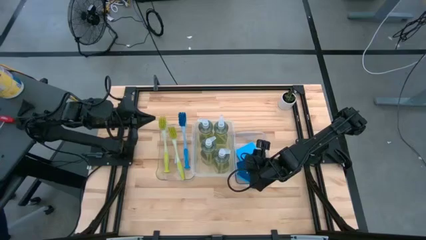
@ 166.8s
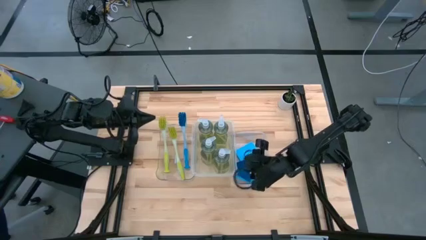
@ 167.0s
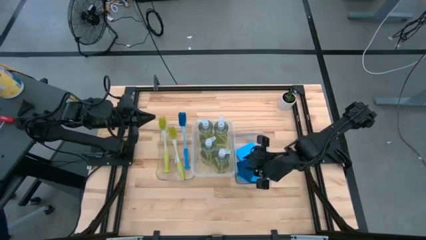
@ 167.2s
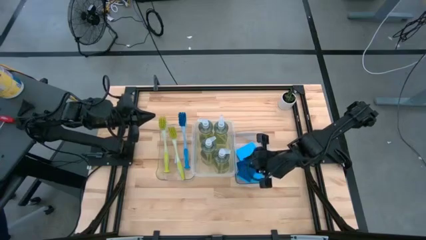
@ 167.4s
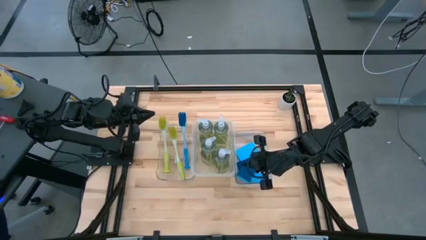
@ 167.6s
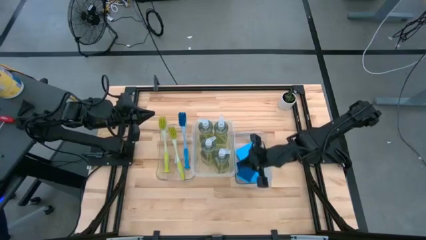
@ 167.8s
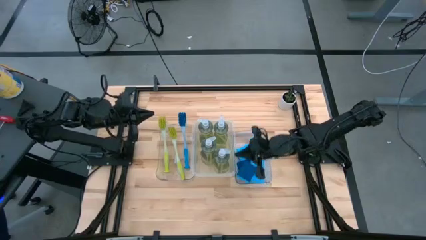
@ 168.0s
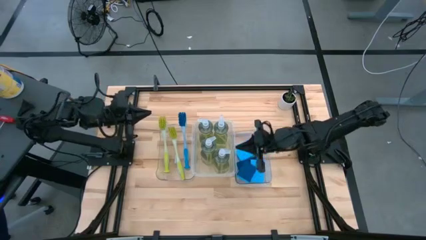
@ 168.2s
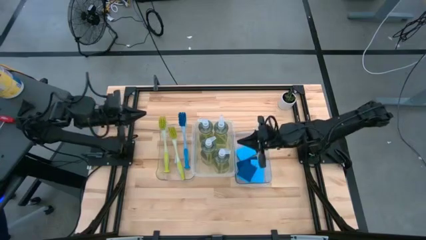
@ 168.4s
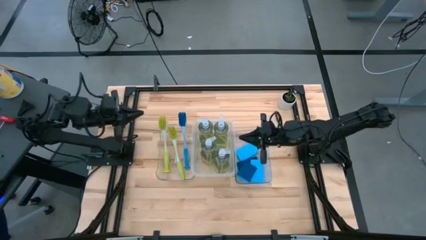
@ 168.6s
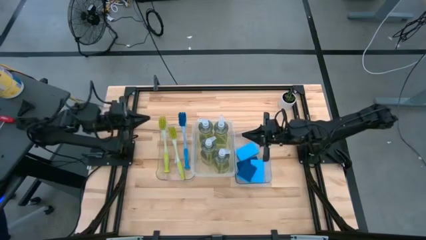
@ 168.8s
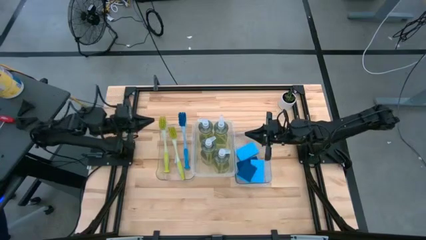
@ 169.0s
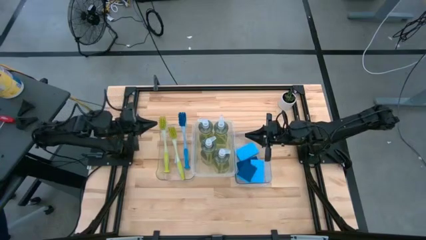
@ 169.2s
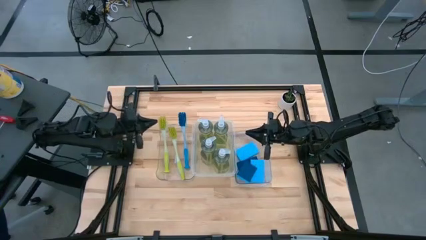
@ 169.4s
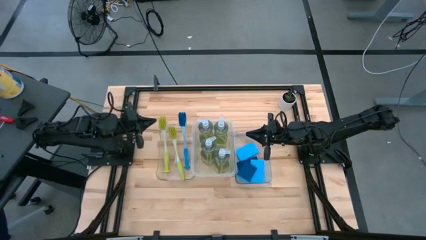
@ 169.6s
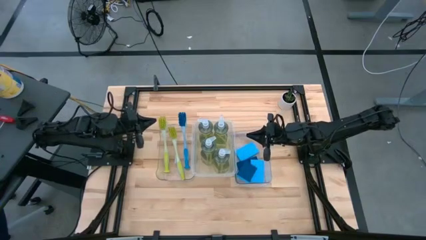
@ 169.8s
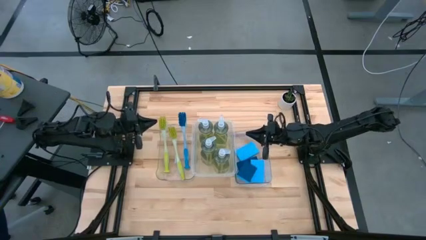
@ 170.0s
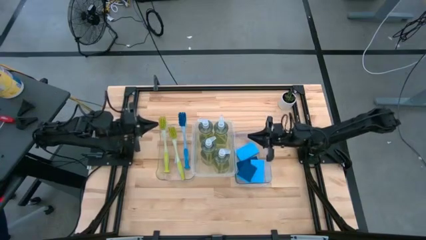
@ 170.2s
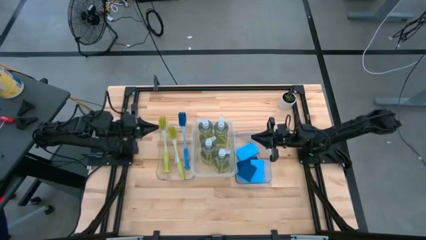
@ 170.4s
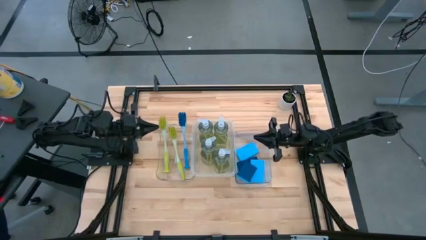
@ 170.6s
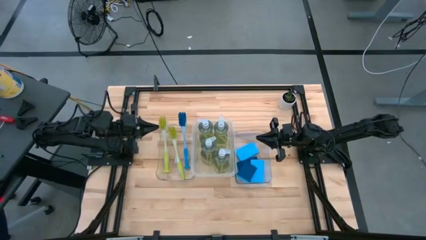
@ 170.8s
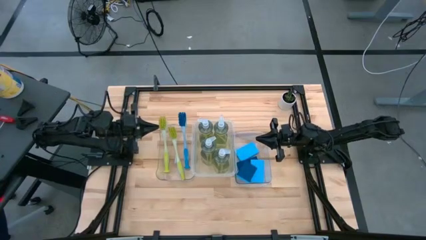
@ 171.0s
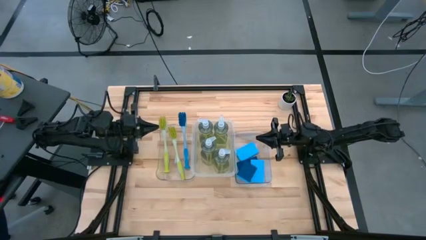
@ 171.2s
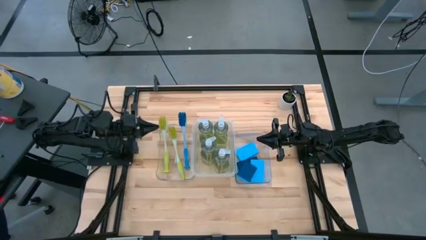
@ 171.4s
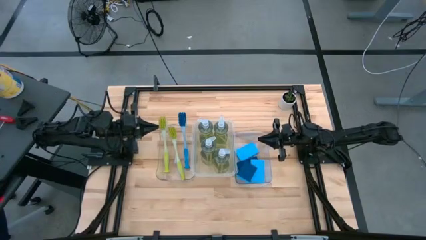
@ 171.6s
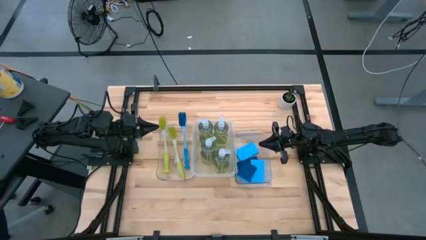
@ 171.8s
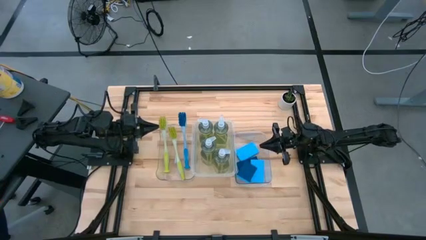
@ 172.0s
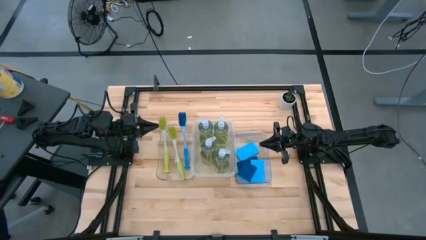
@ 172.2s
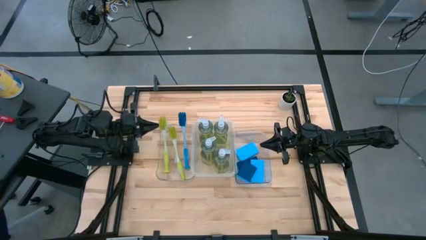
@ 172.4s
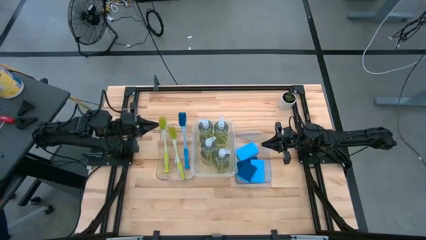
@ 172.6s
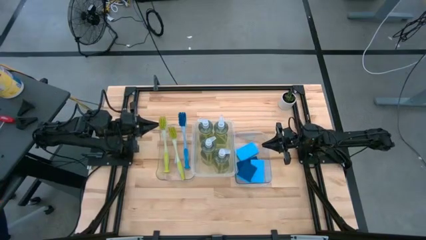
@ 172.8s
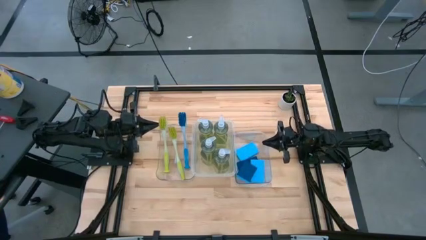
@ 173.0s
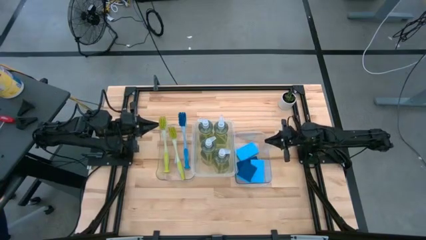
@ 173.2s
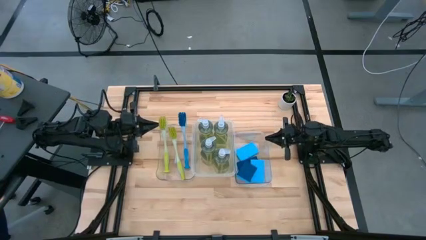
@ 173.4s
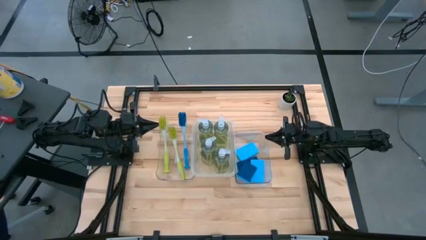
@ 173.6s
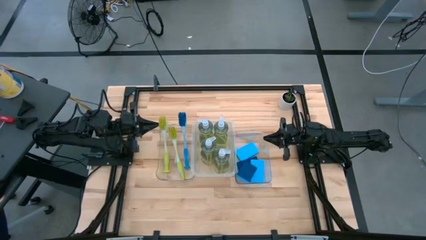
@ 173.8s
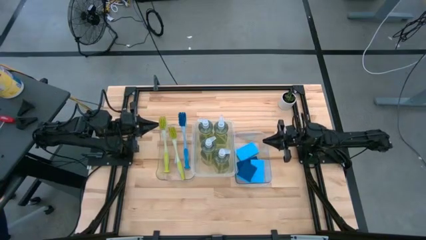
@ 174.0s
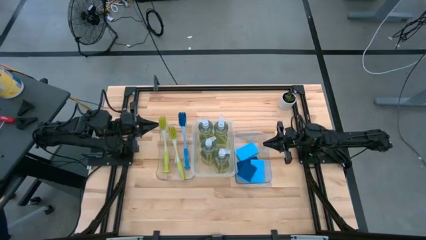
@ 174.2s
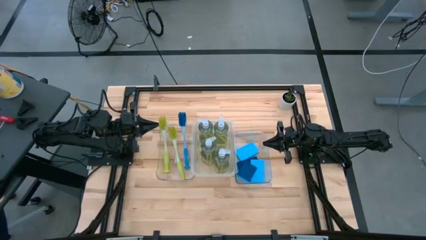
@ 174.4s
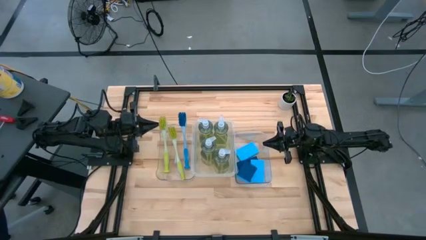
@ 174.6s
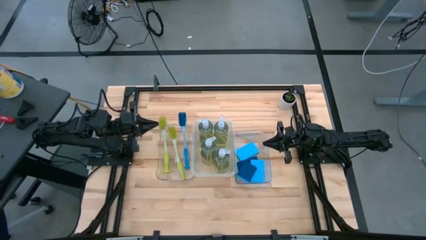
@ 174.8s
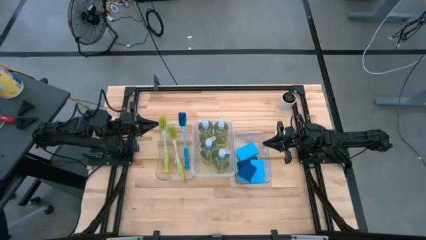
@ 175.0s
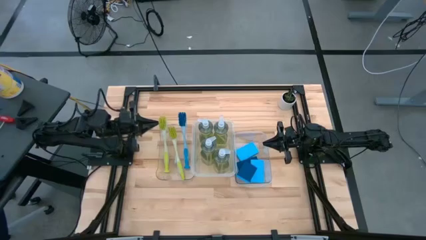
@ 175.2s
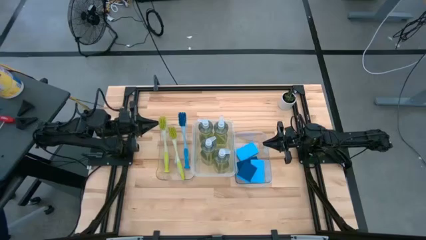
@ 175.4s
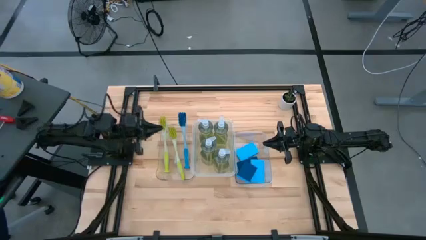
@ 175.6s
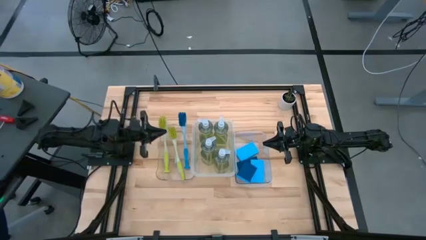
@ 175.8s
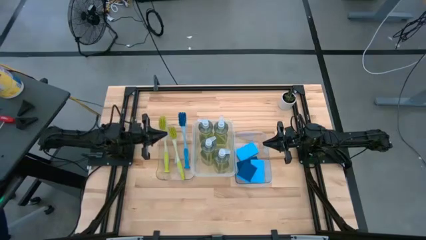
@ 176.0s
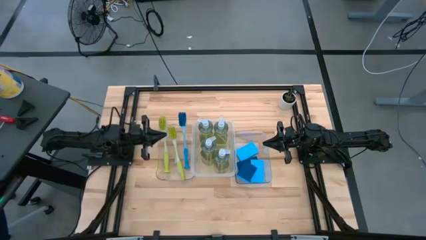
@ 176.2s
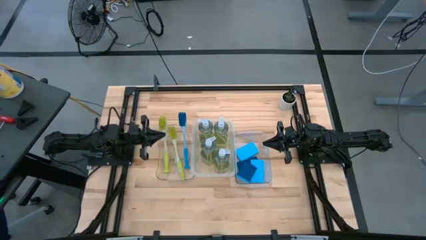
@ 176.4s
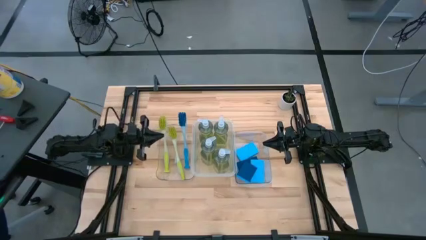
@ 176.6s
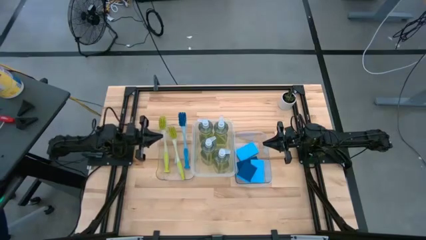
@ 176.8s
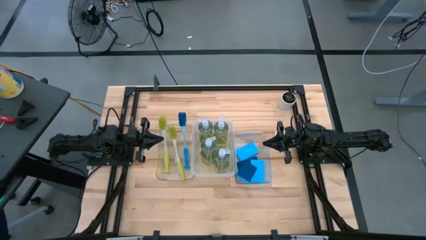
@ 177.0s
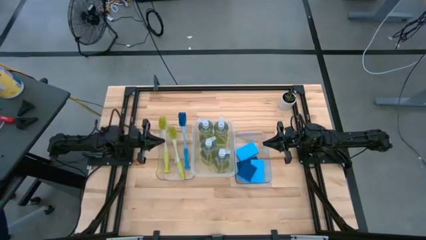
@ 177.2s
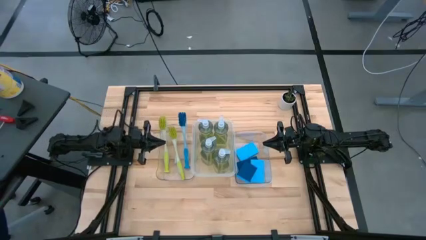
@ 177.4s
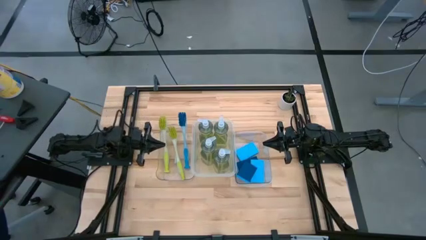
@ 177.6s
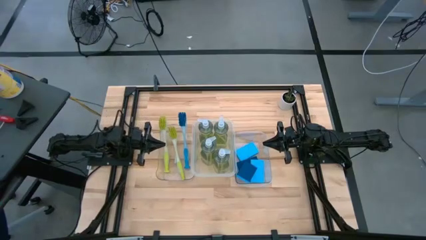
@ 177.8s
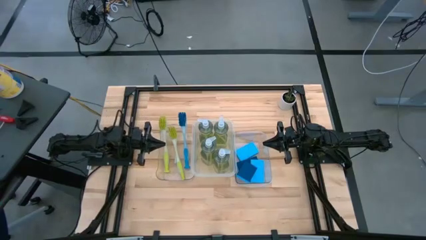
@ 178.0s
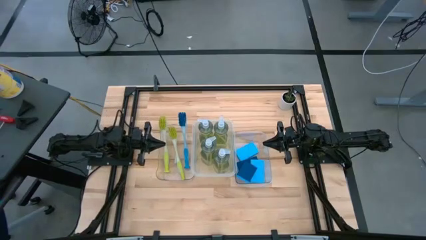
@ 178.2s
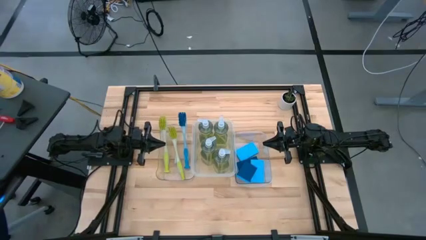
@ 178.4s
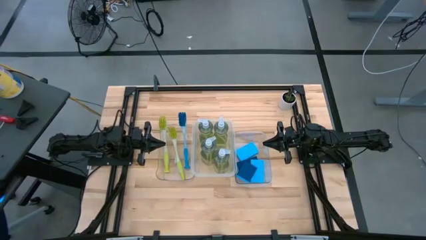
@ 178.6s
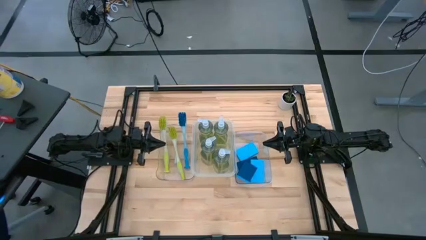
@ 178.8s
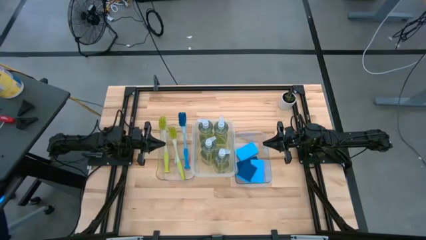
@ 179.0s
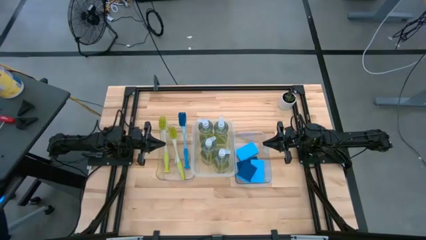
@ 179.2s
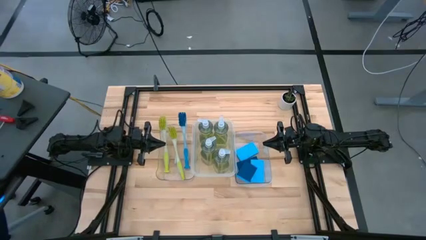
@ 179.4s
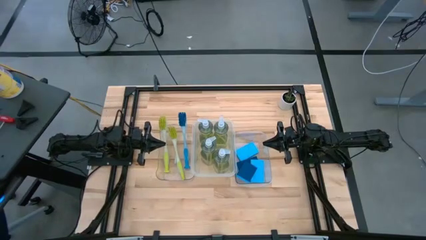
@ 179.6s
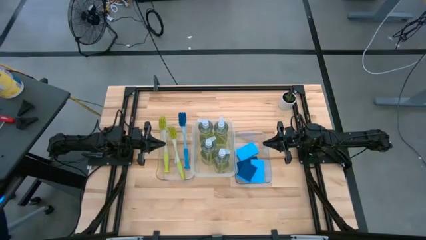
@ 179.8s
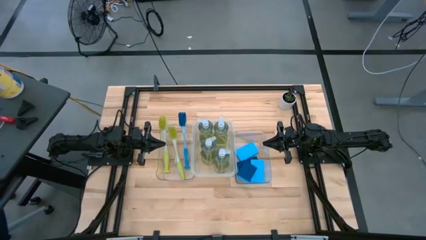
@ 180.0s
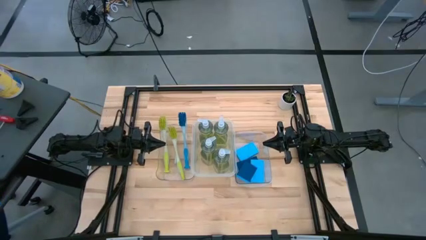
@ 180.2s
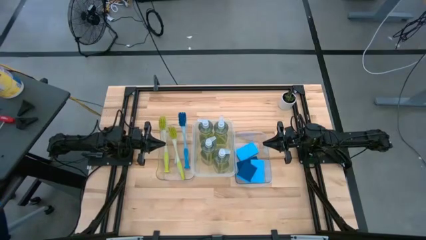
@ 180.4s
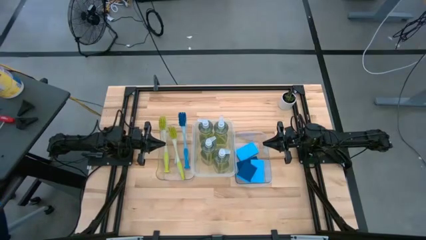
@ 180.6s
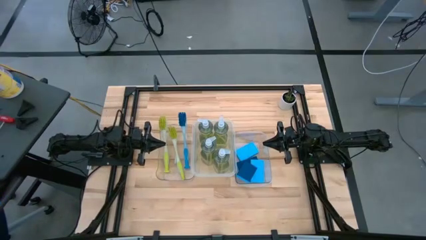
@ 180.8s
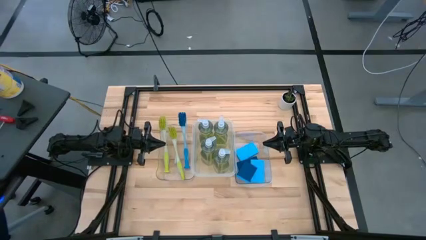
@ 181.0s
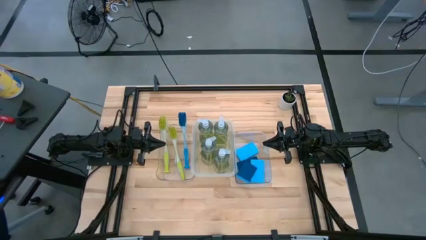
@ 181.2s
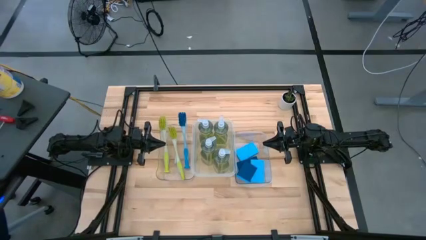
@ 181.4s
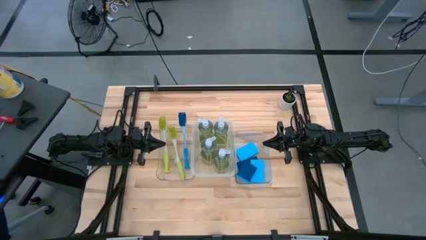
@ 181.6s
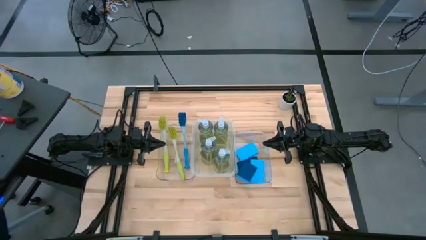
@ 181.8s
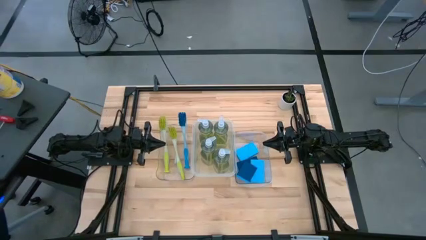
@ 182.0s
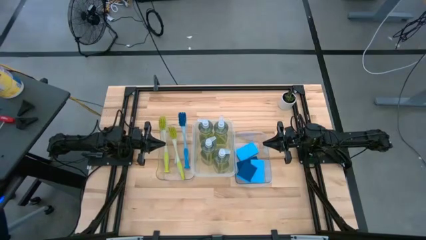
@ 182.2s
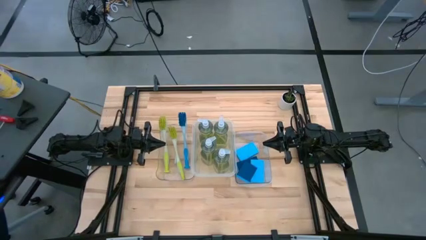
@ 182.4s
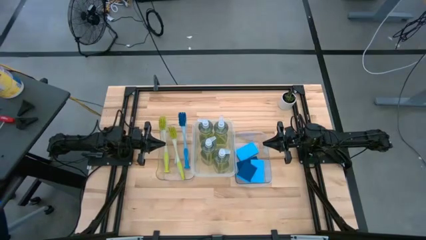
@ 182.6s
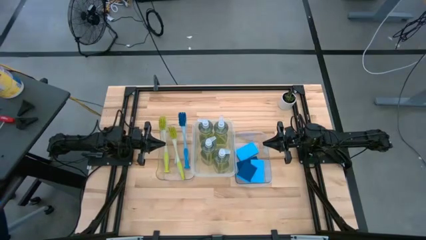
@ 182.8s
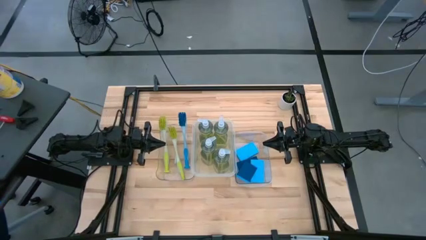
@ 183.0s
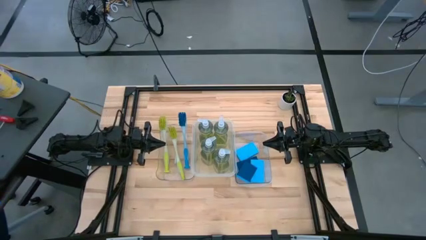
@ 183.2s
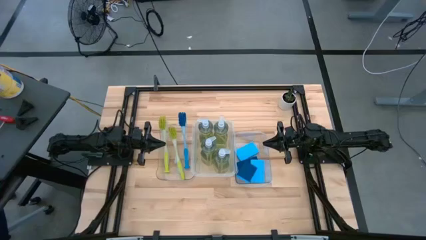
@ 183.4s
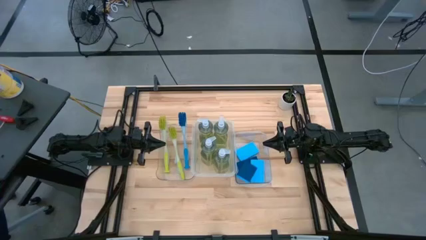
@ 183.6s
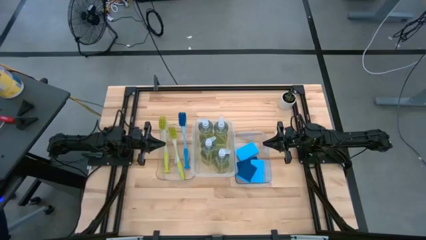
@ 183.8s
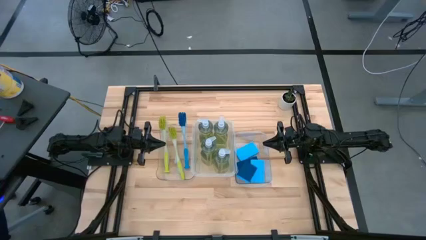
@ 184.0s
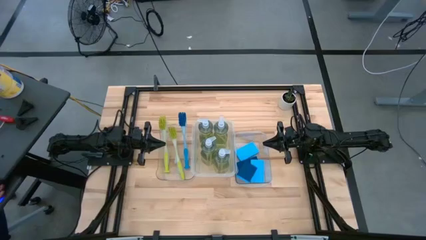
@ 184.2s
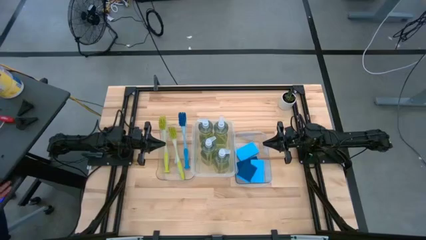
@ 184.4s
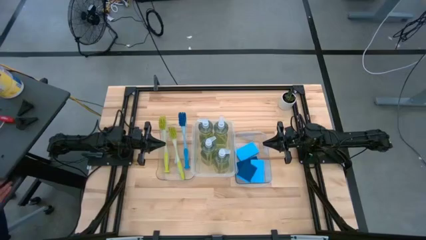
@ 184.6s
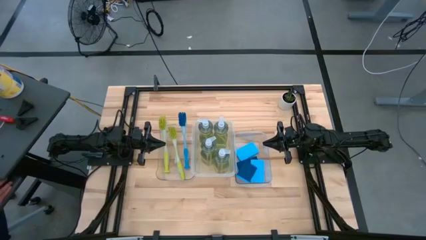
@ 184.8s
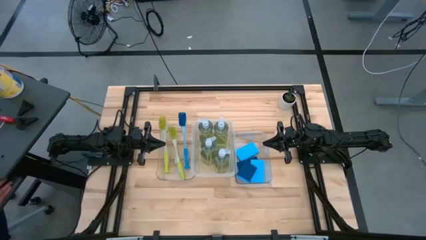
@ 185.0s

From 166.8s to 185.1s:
Task: Pick & Place Kitchen Sink Supplies
Return to Home Position
